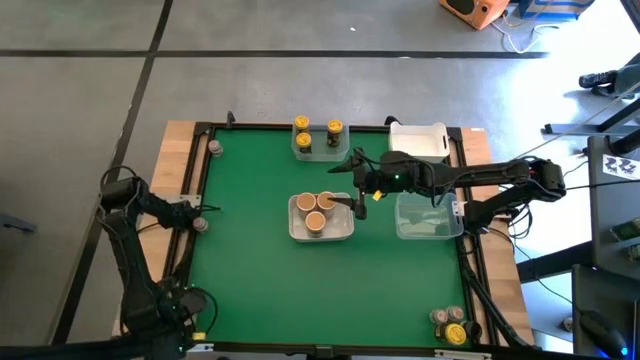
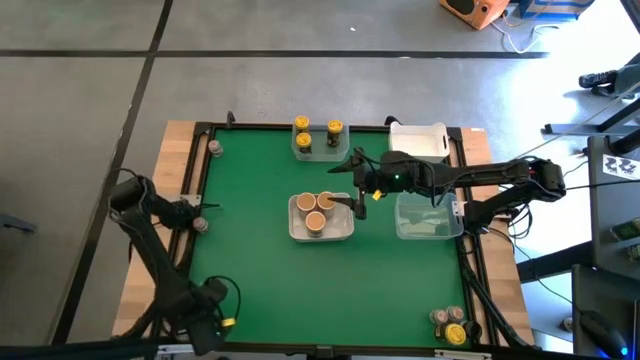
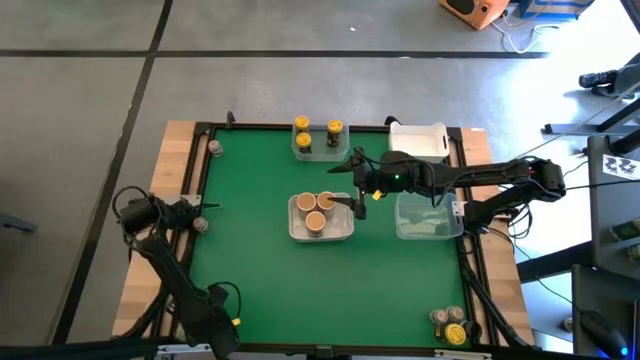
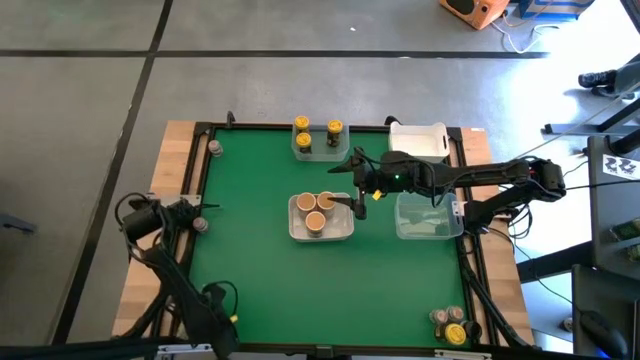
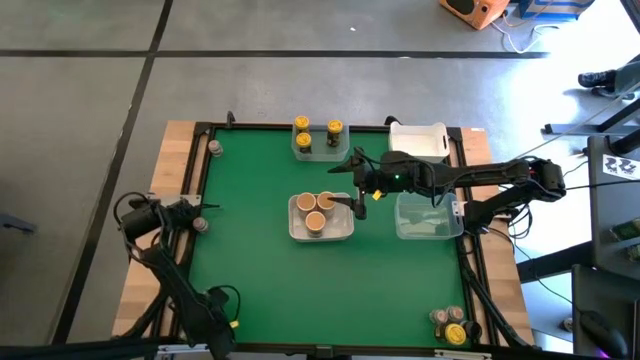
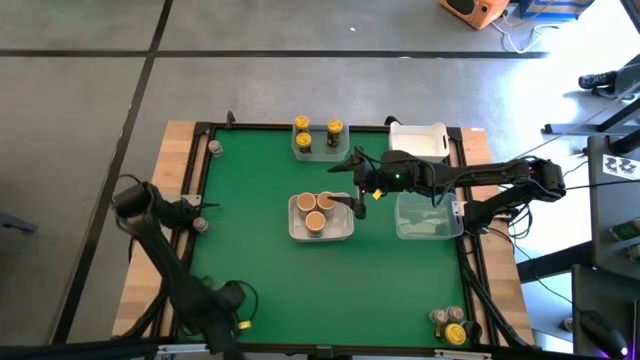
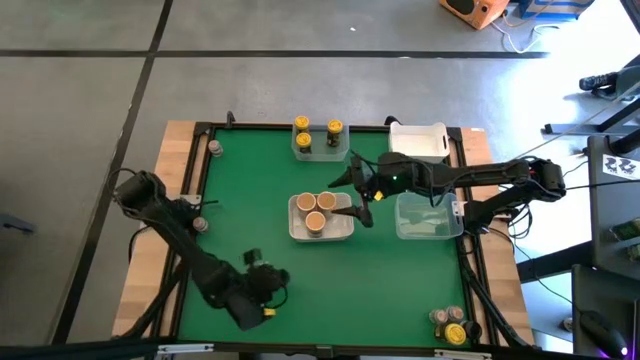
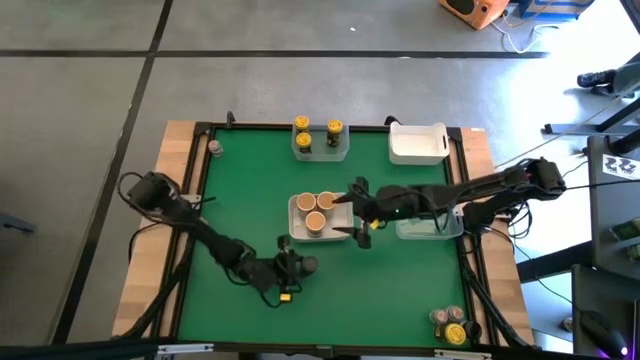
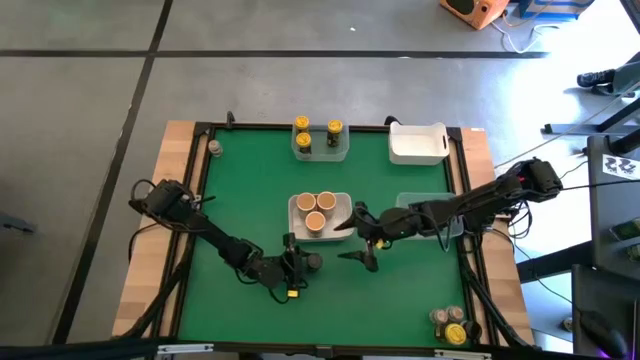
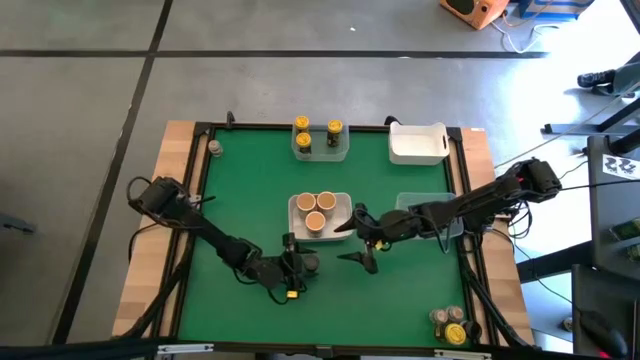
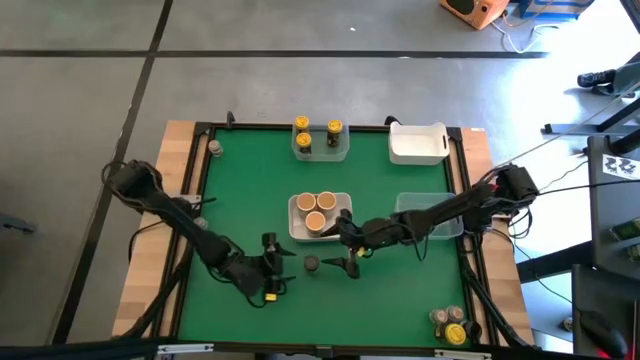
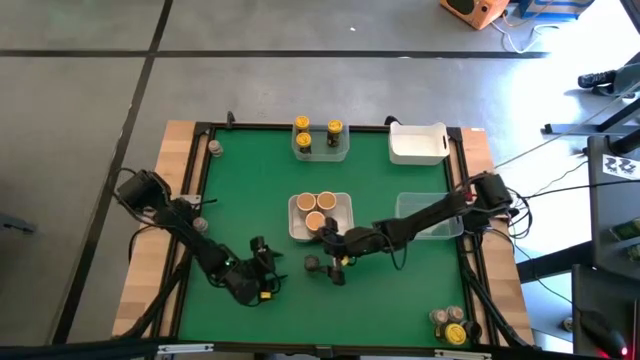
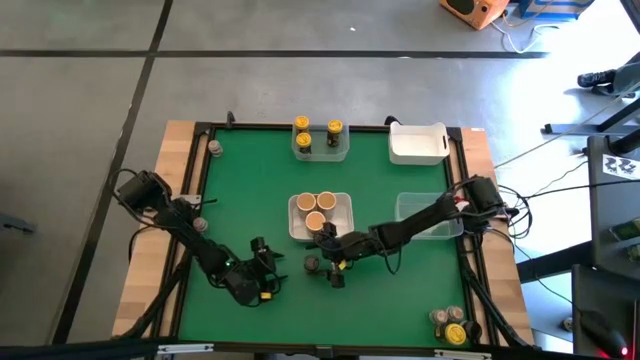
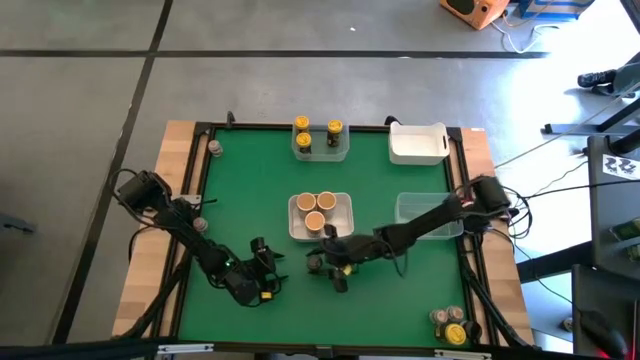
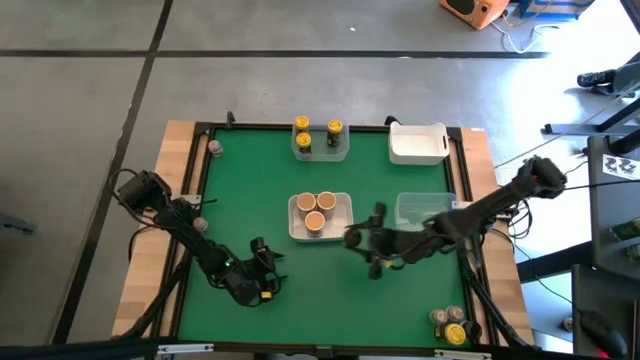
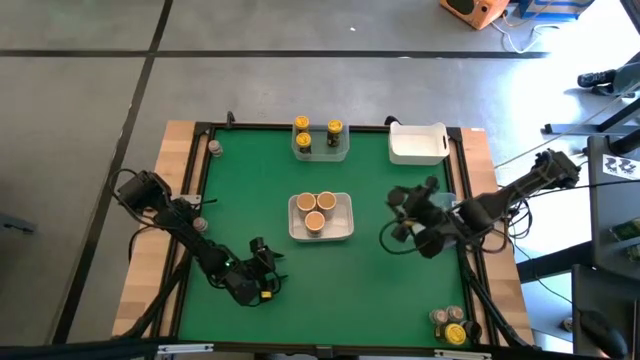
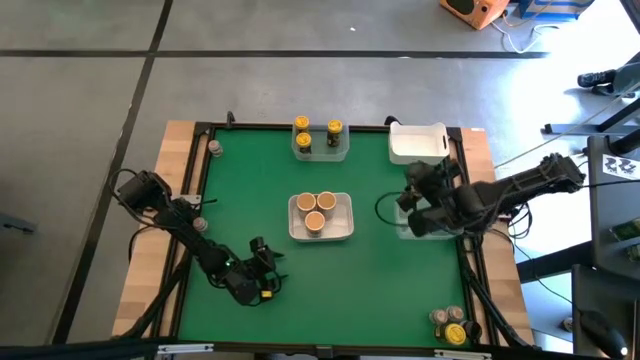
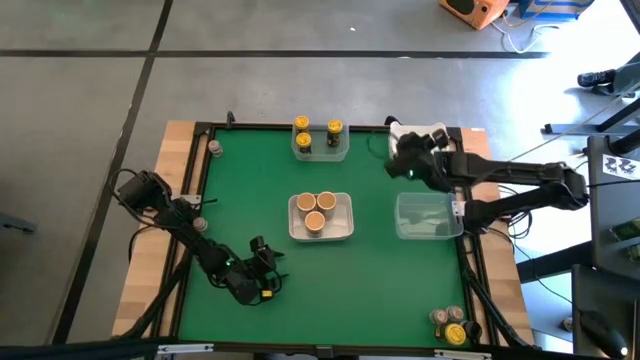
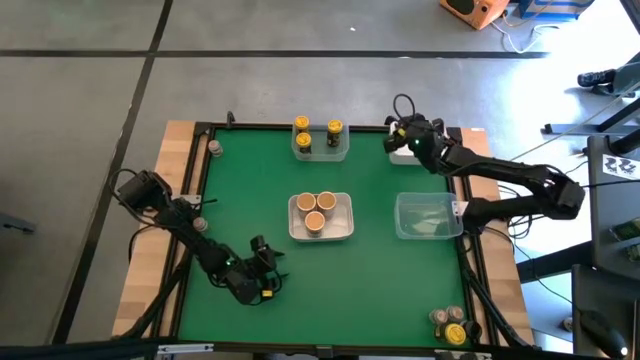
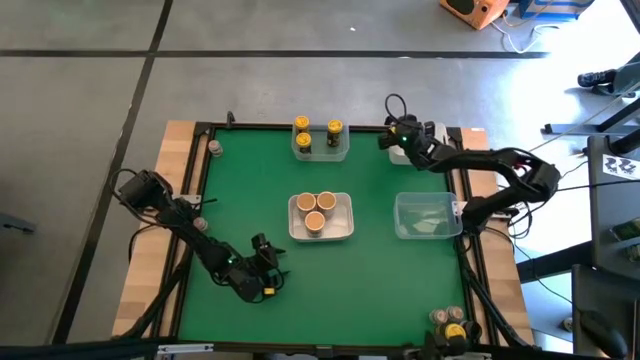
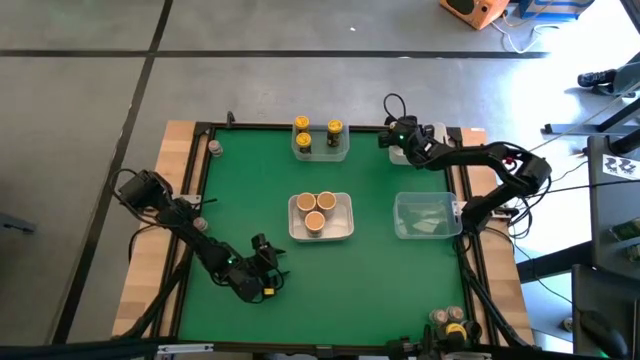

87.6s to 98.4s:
Task: Sort spices by type
Put the left black seasoning bottle into the top white bin

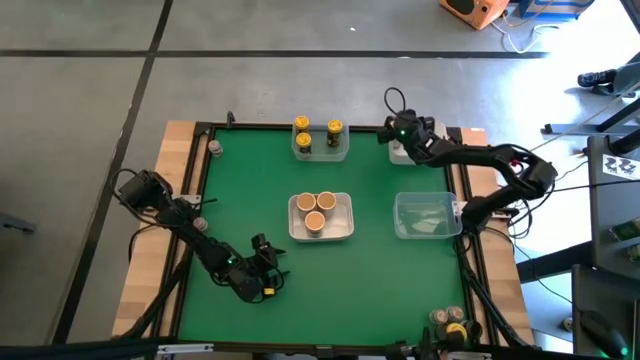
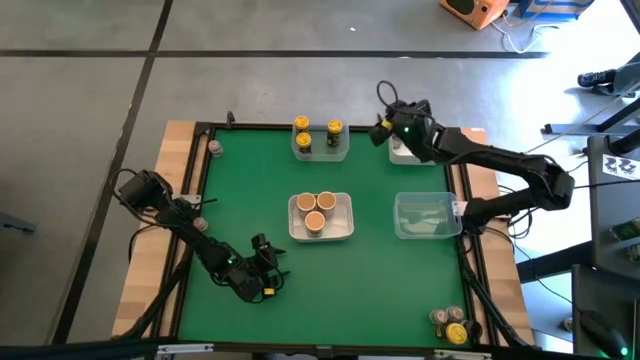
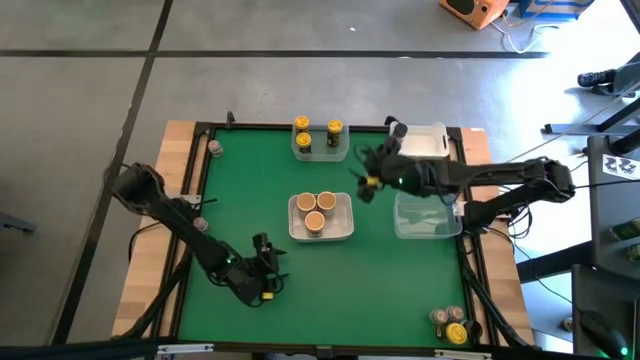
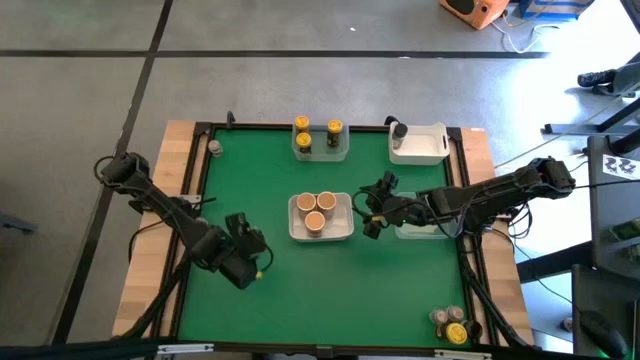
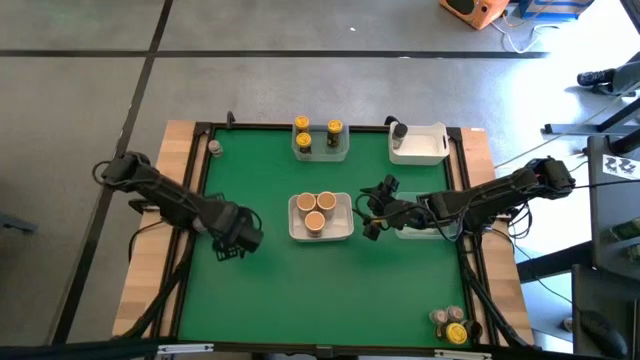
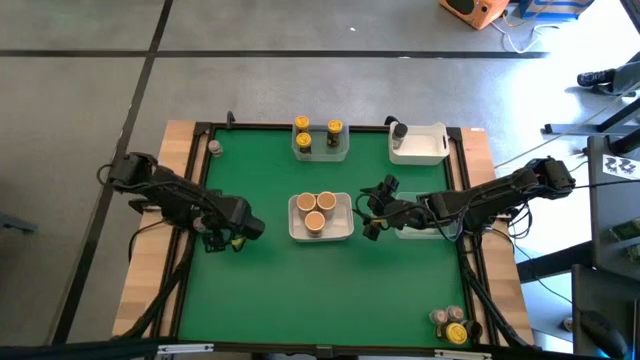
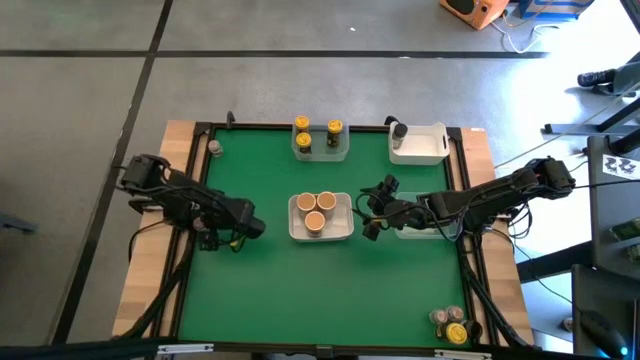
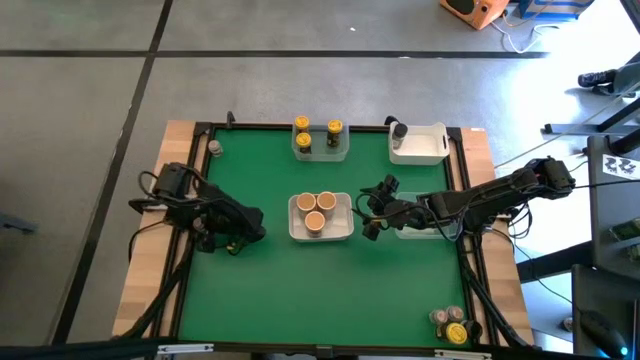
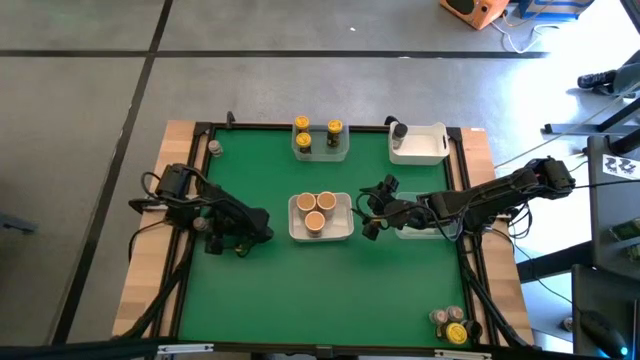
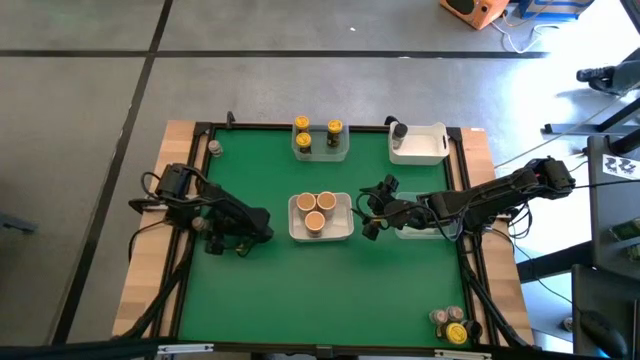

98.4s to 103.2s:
Put the middle brown seasoning bottle into the bottom transparent bin

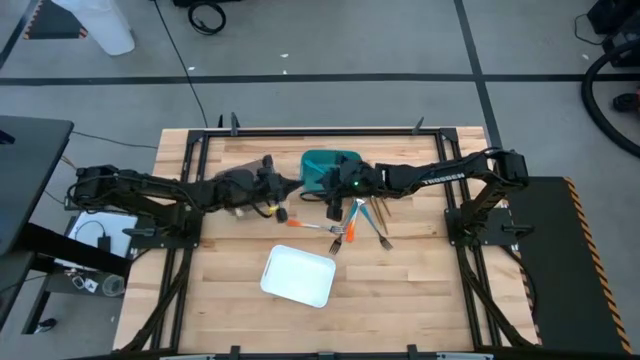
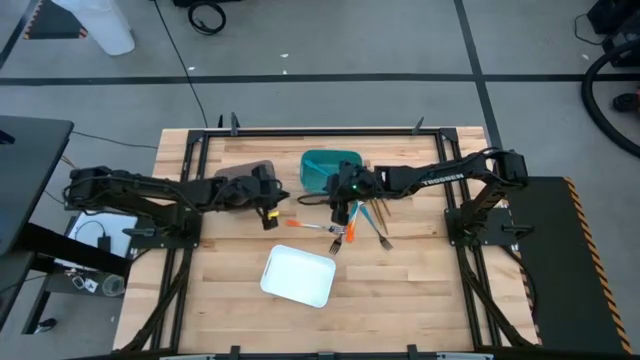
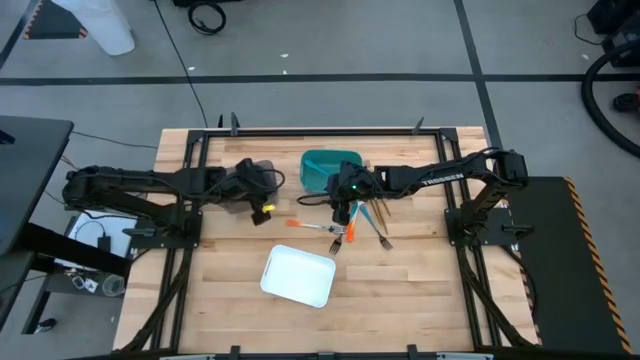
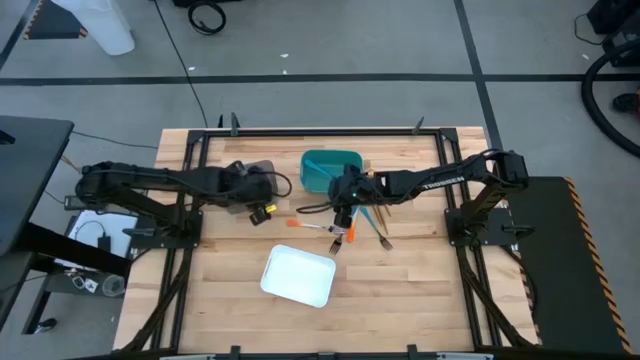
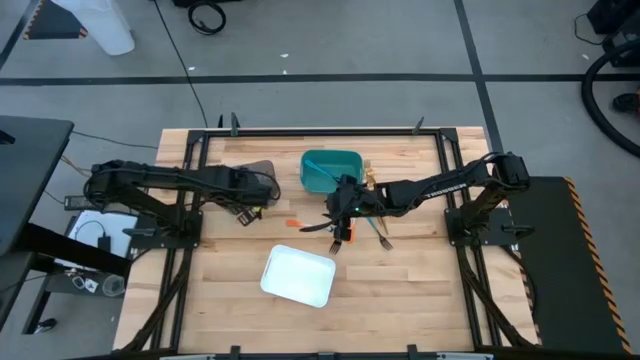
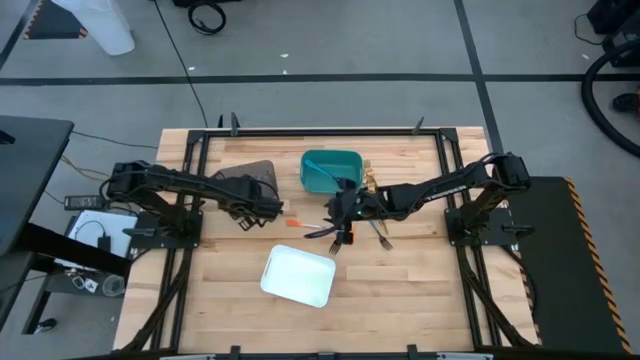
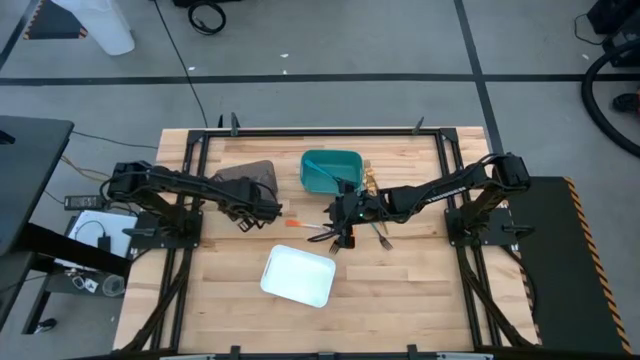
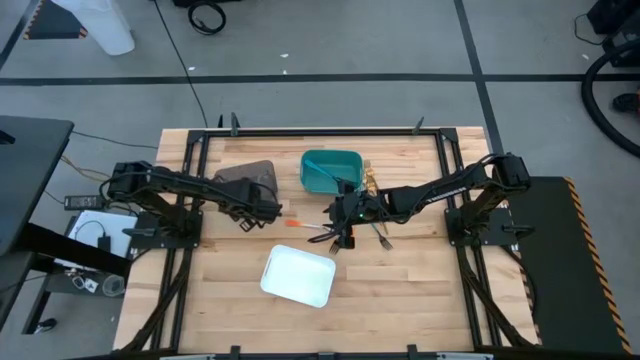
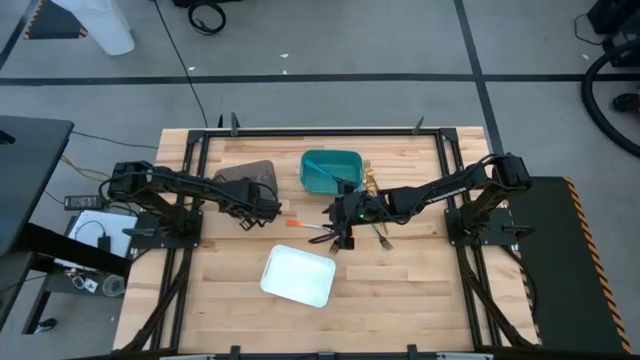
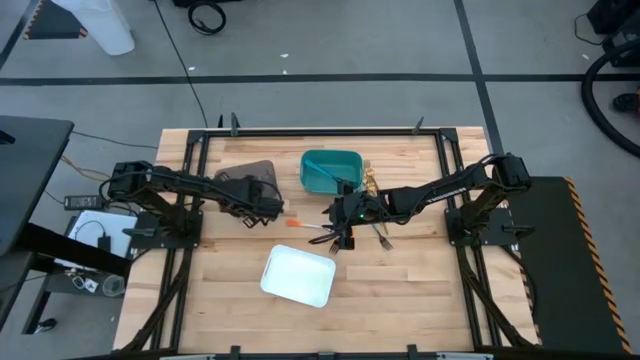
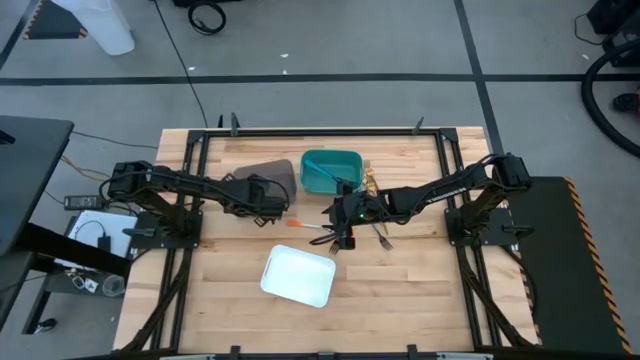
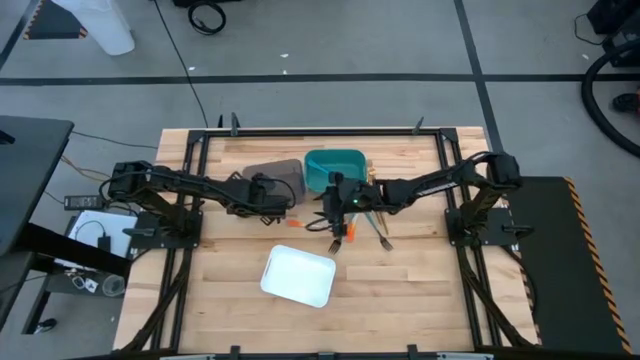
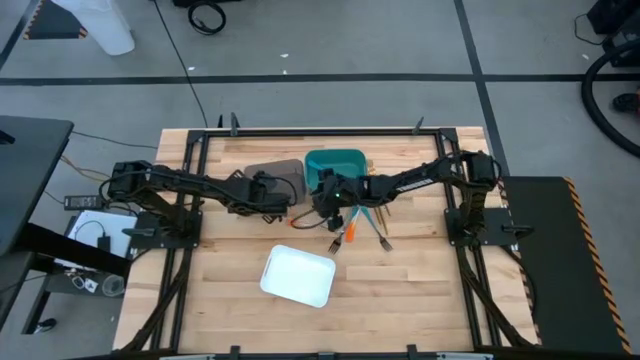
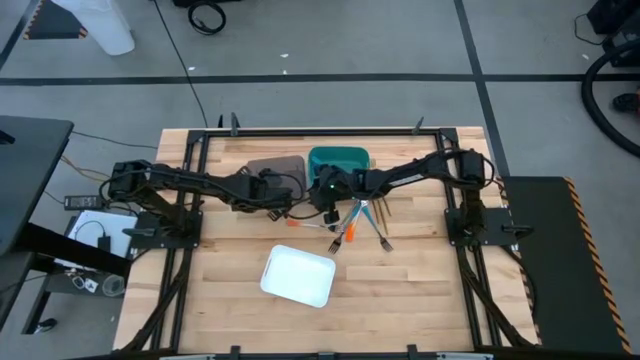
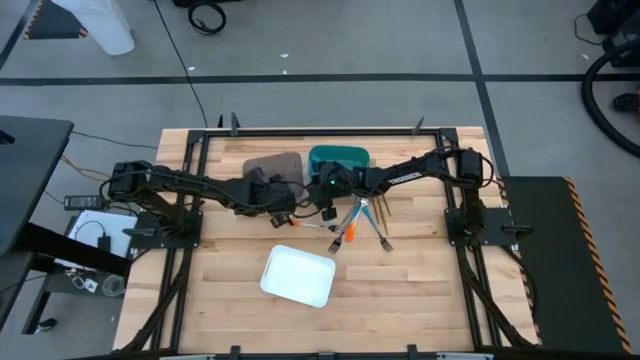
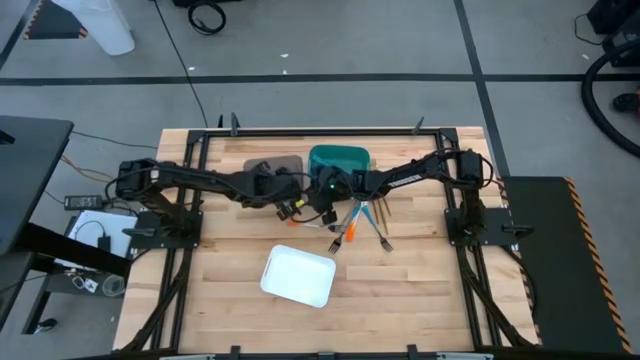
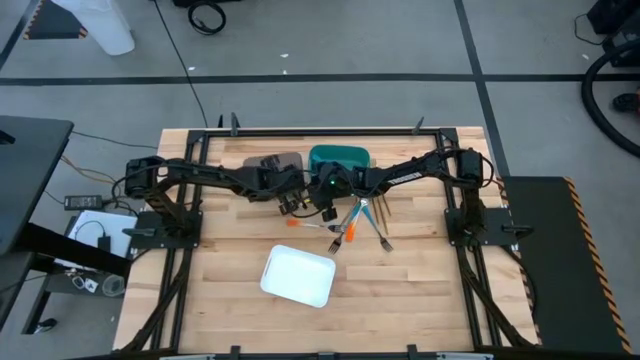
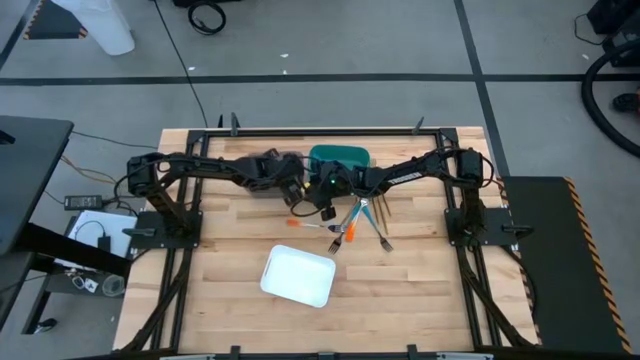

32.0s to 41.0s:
Task: Sort silverware by color (type)
Put the orange fork into the black bin
